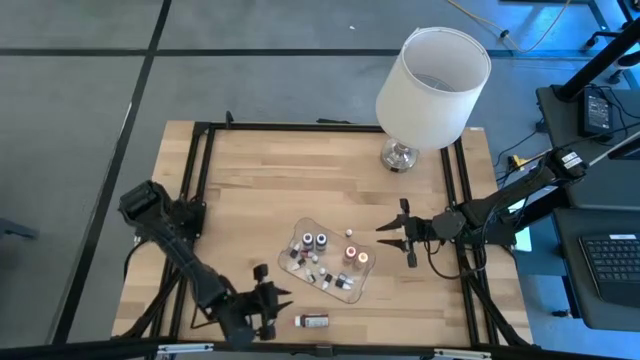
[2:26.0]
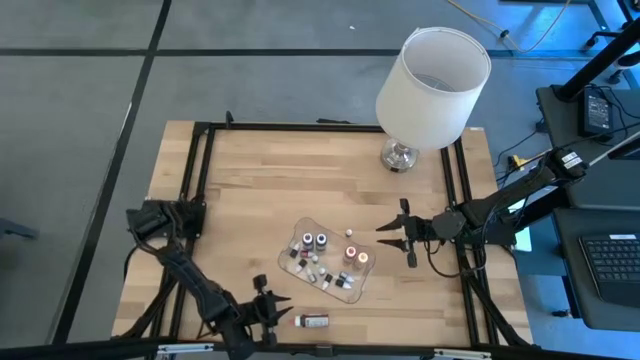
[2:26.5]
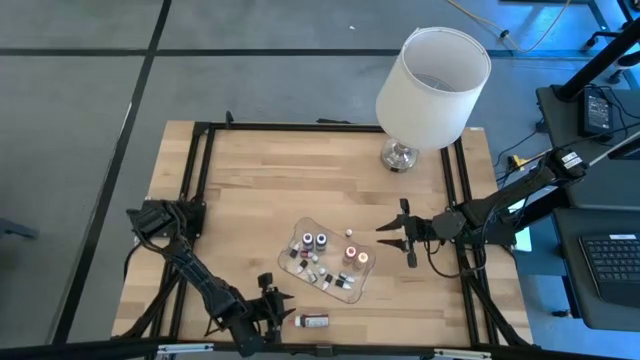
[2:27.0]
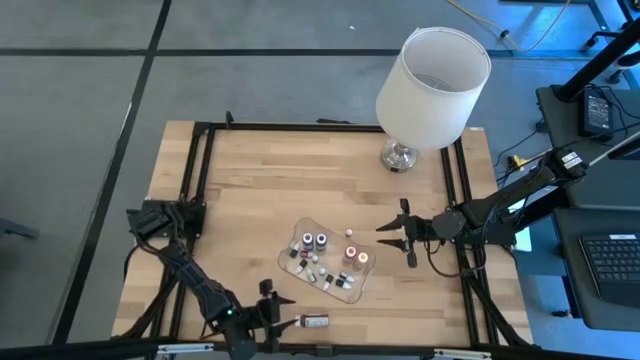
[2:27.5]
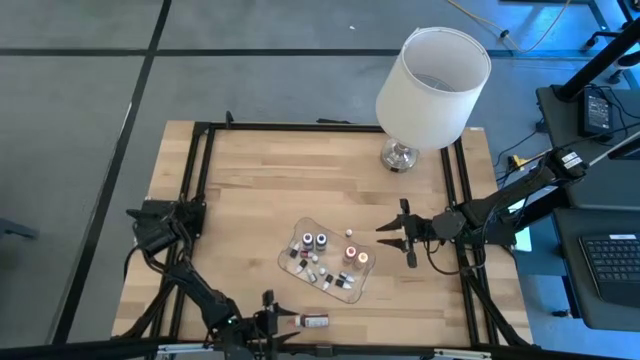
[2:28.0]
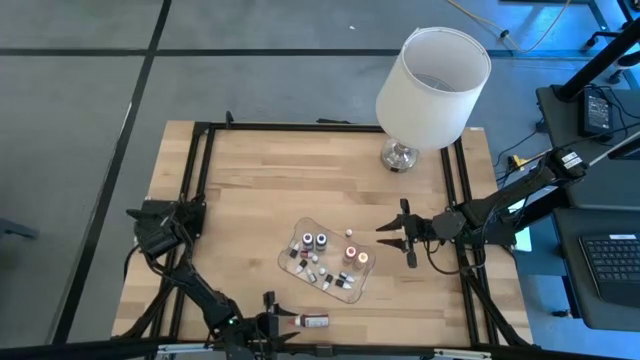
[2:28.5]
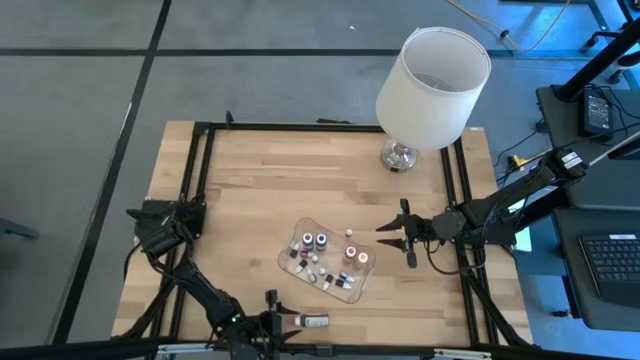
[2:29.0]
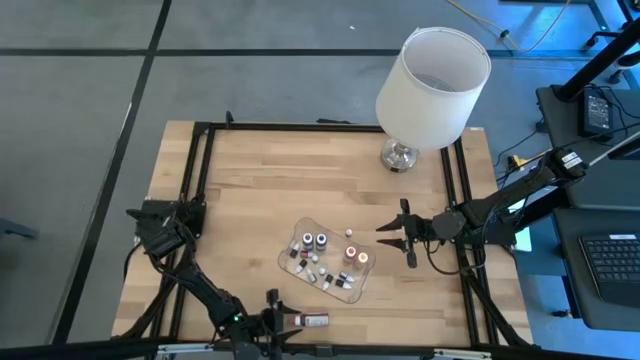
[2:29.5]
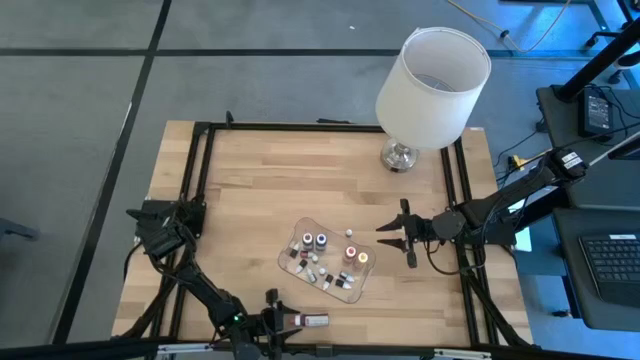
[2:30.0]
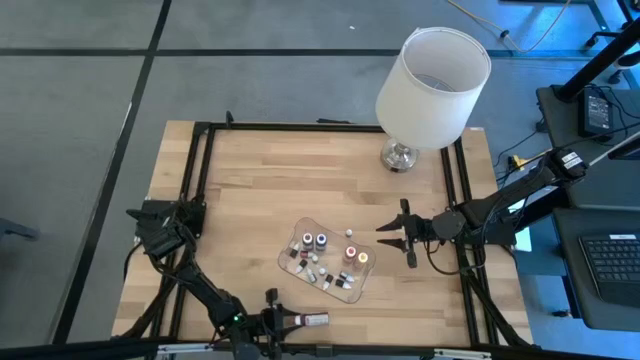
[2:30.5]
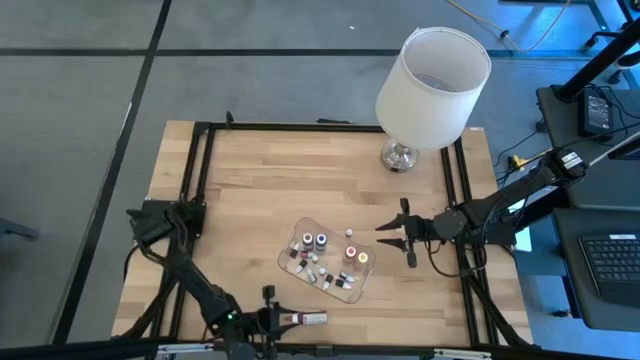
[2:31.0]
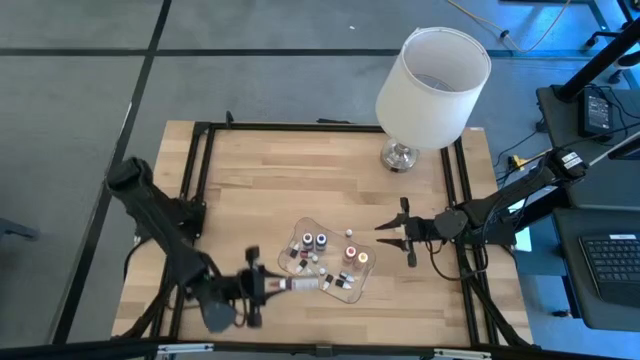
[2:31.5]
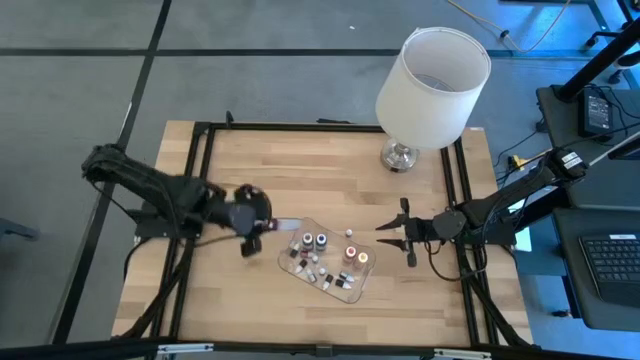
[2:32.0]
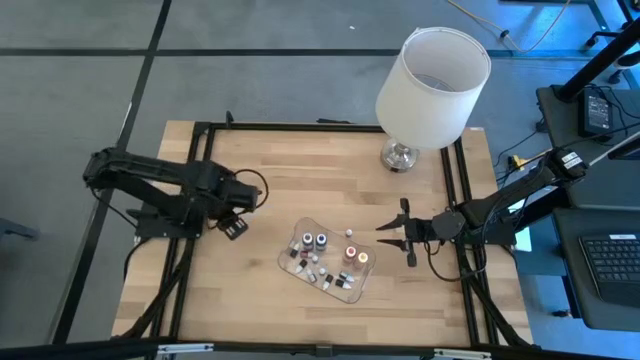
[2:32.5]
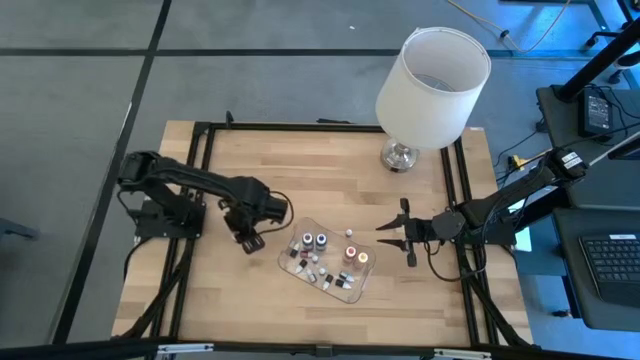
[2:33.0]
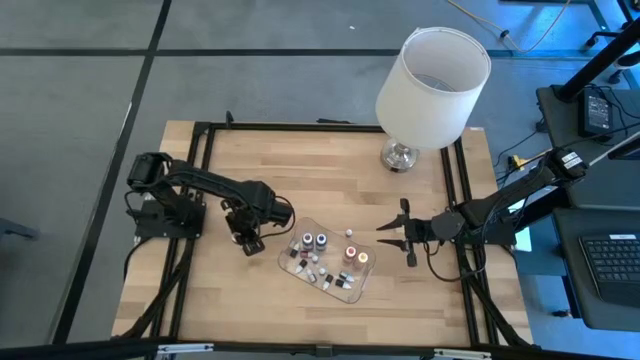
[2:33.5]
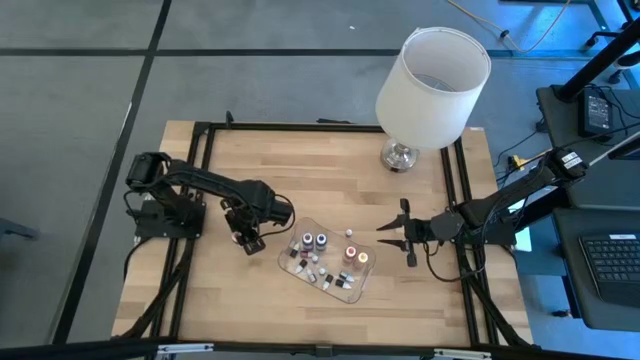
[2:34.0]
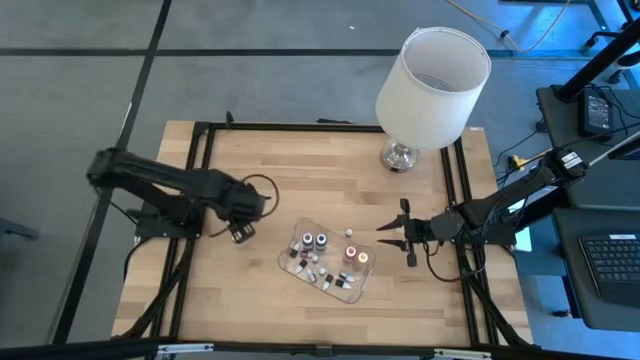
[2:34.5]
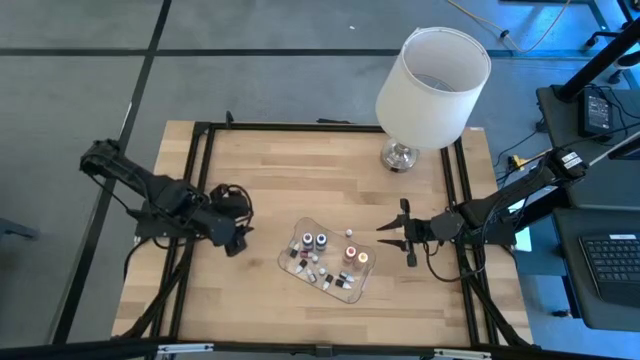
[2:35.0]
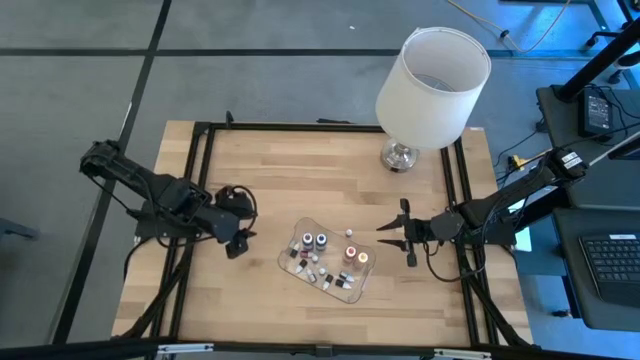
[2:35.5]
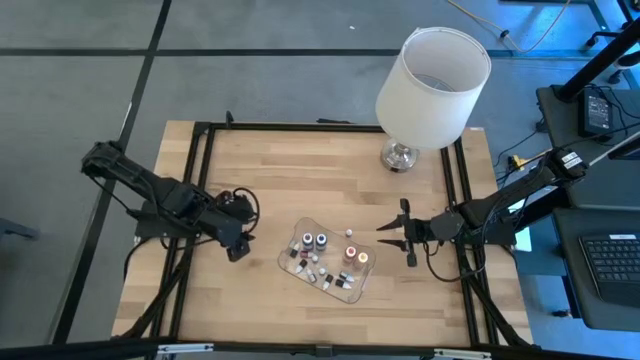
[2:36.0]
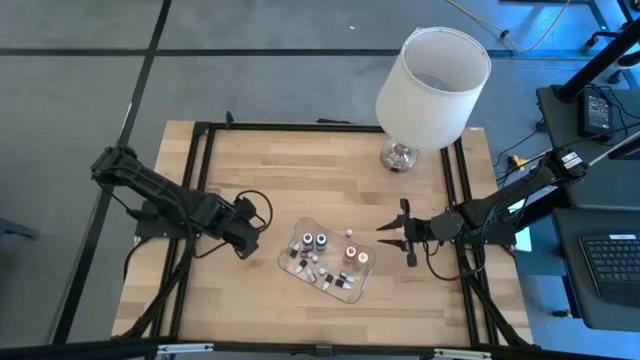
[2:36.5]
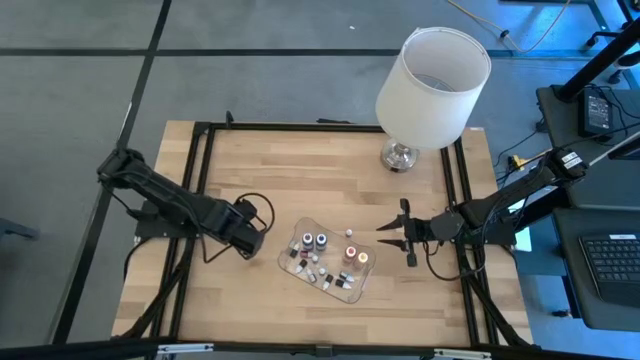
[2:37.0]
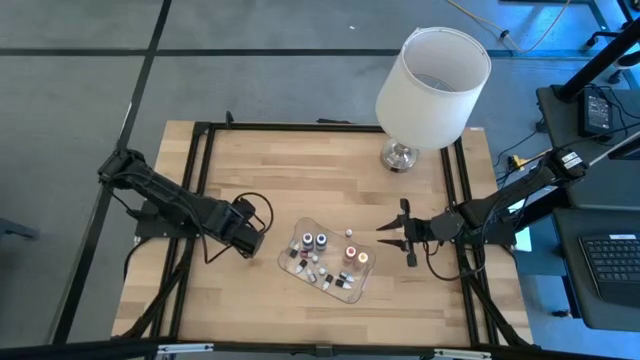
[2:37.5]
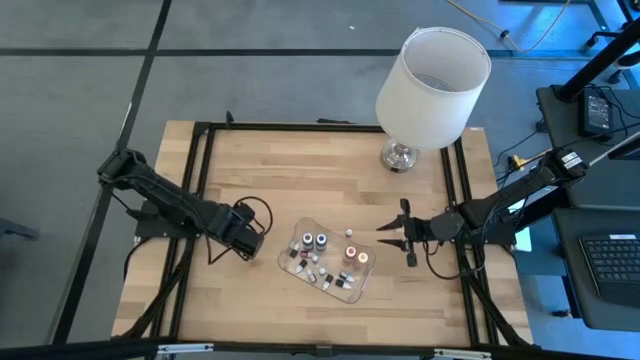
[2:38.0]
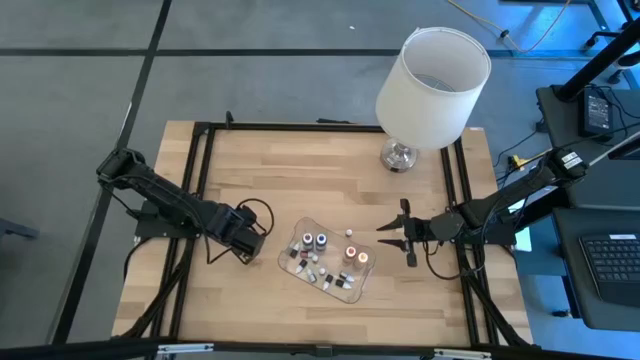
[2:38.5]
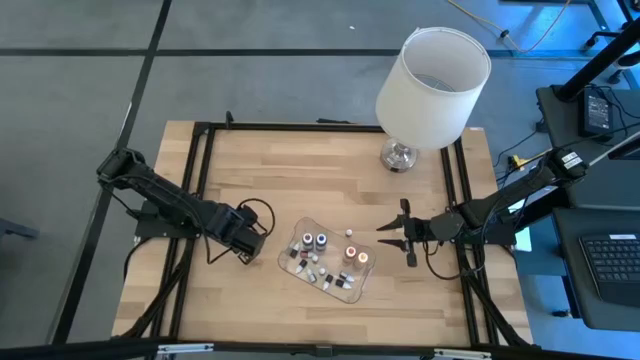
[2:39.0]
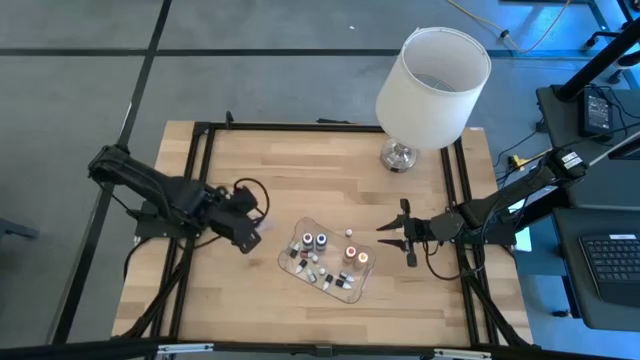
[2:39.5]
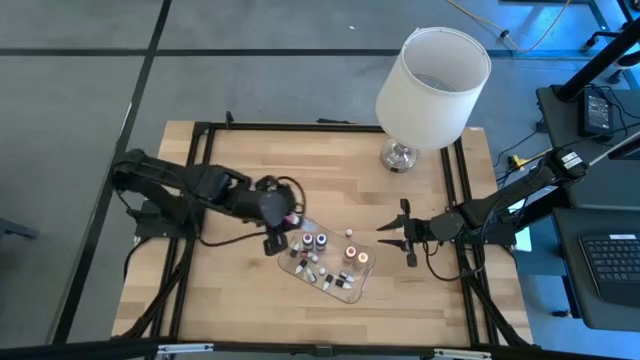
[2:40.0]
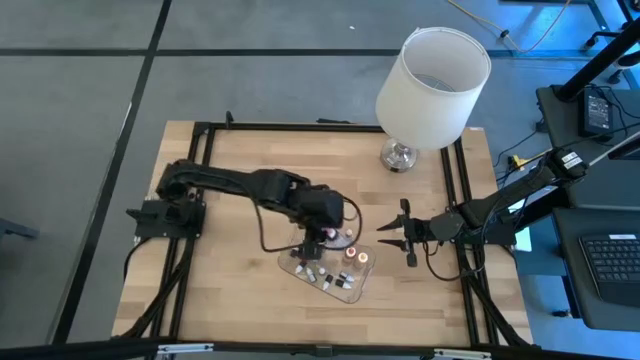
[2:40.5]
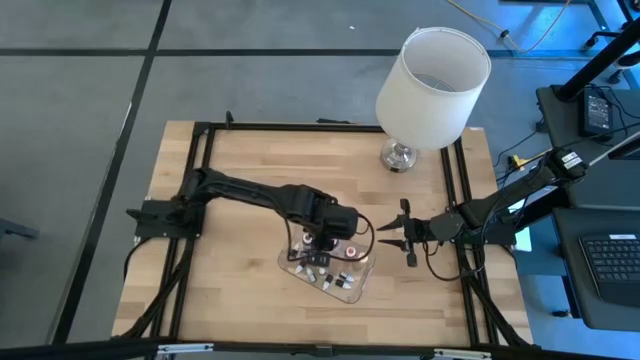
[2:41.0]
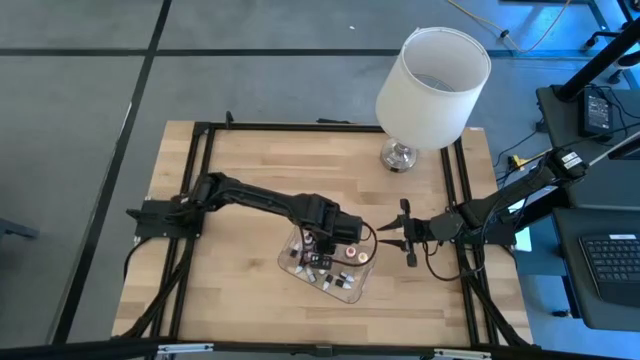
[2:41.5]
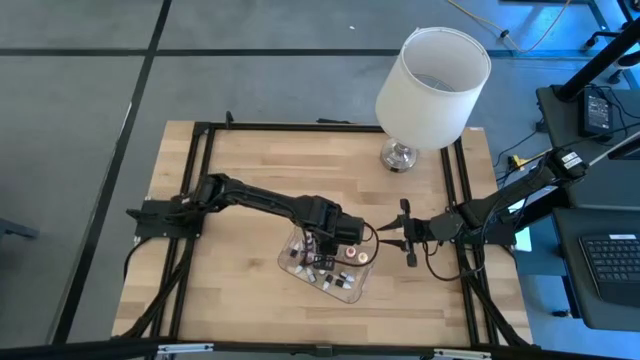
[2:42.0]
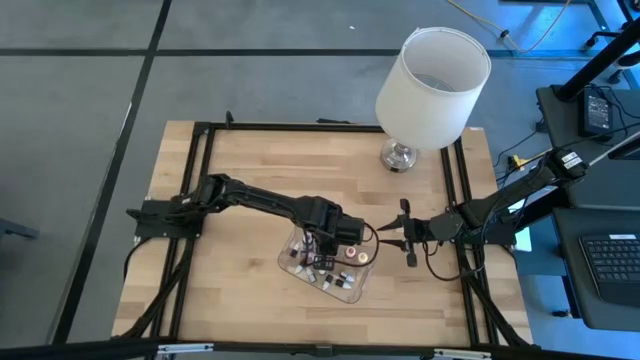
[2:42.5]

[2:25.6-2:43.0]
Task: Pick & Place food coloring
Put the big pink food coloring bottle into the container

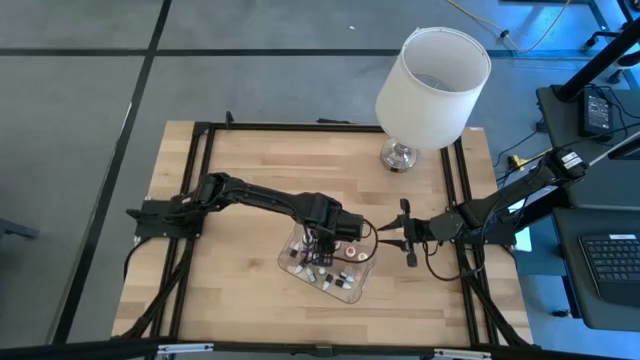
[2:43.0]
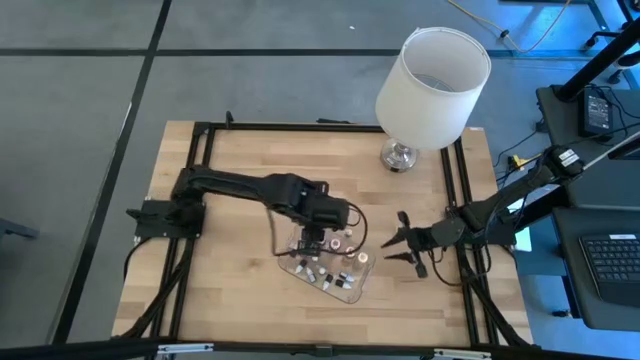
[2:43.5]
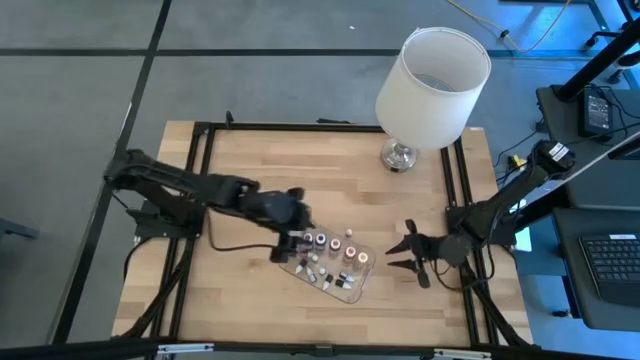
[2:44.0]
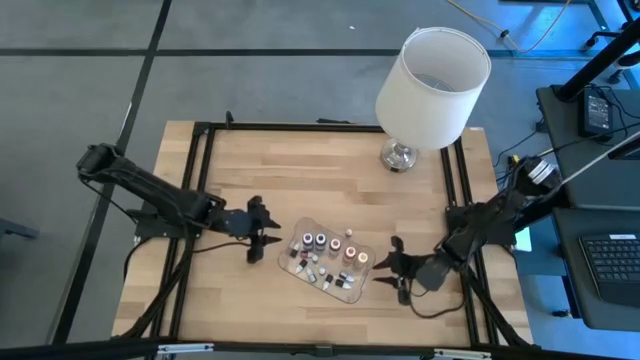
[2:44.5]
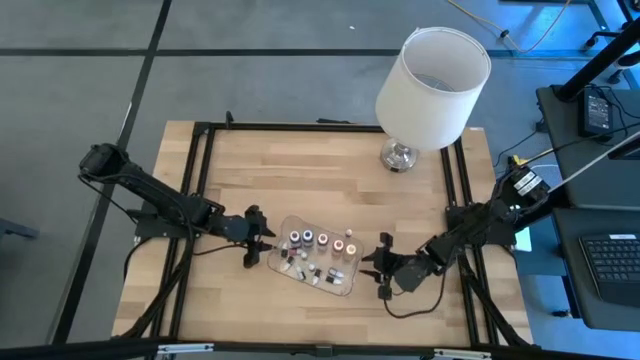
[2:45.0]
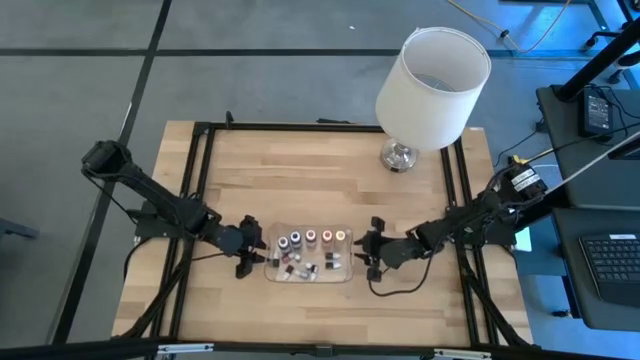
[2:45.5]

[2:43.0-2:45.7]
Adjust the container

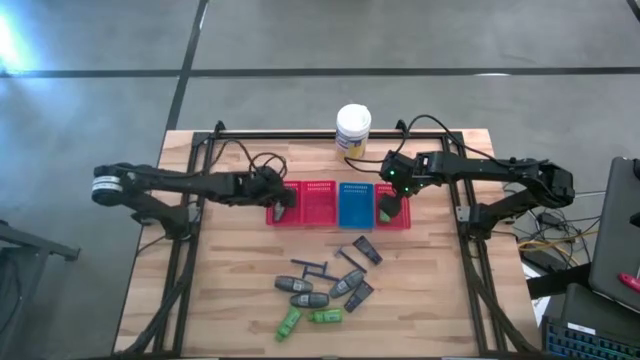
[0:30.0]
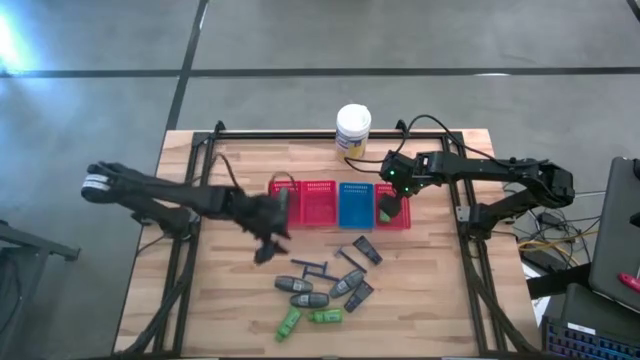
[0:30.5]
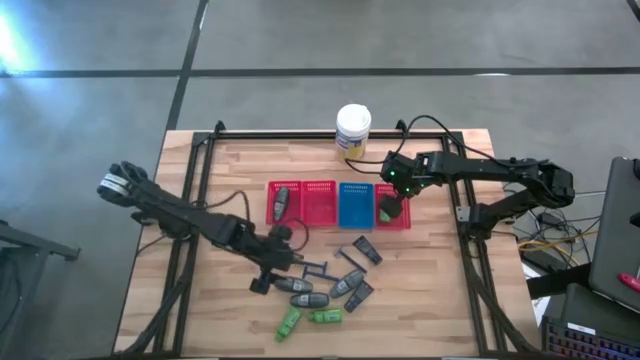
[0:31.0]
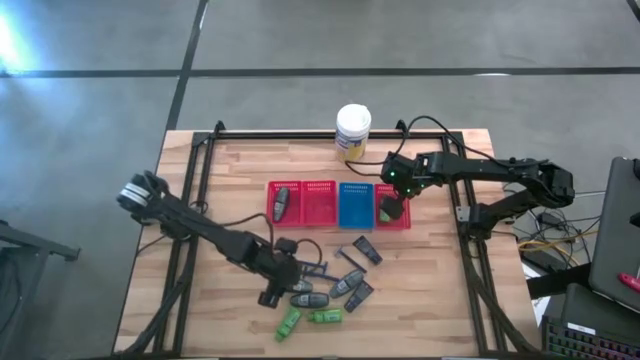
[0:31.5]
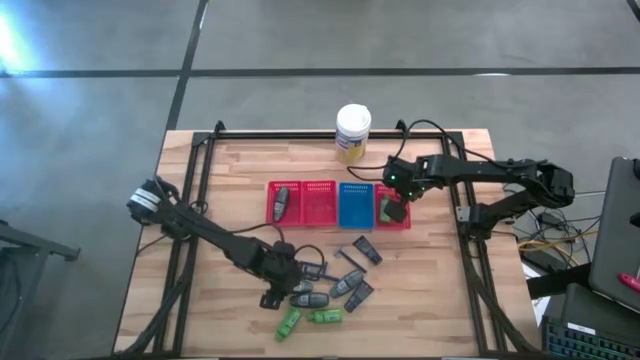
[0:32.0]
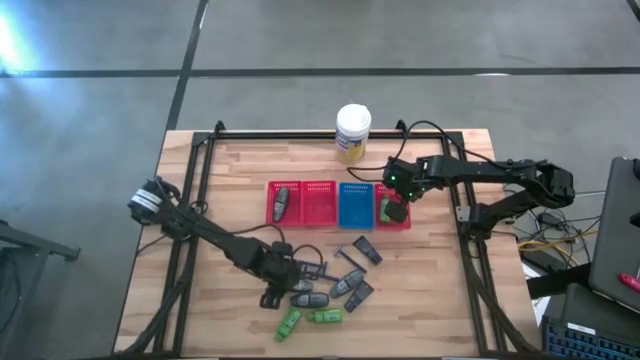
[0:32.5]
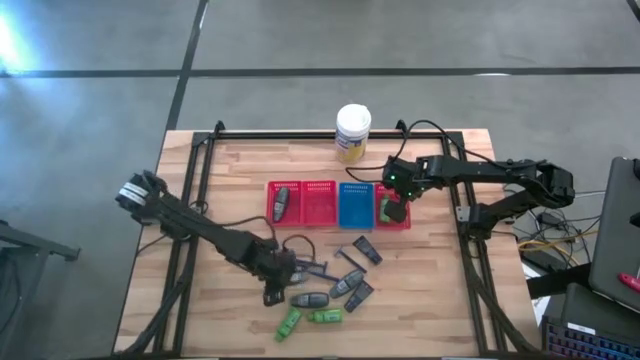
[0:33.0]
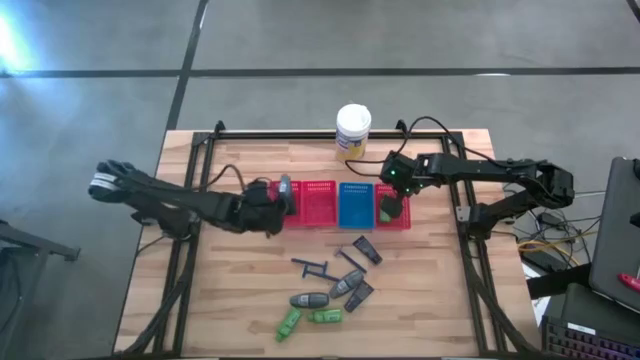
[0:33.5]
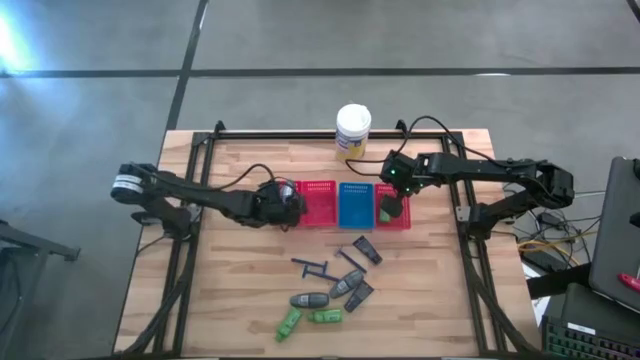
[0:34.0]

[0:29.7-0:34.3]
Task: Pick & Place Travel size toiletries
Put the black deodorant into the left red bin
